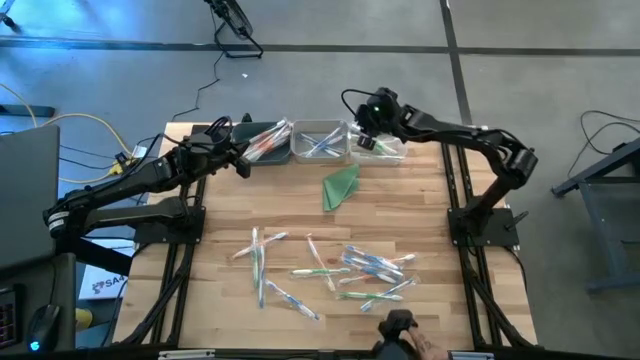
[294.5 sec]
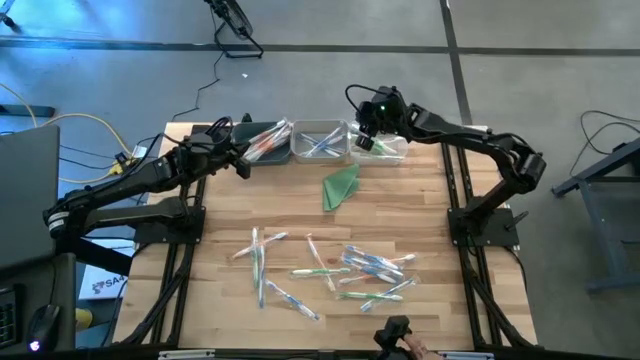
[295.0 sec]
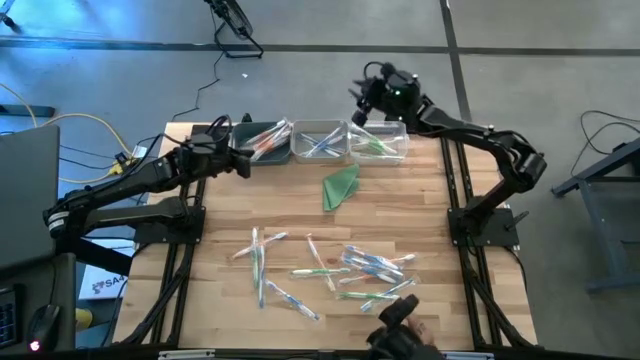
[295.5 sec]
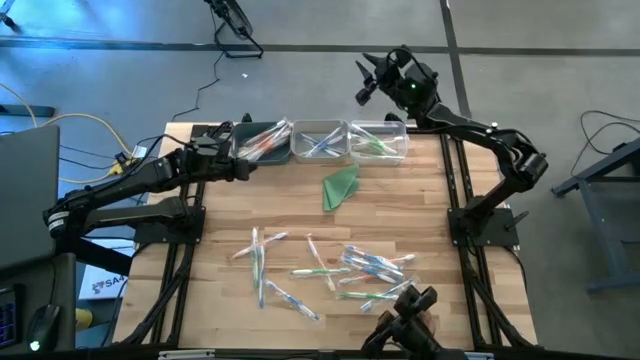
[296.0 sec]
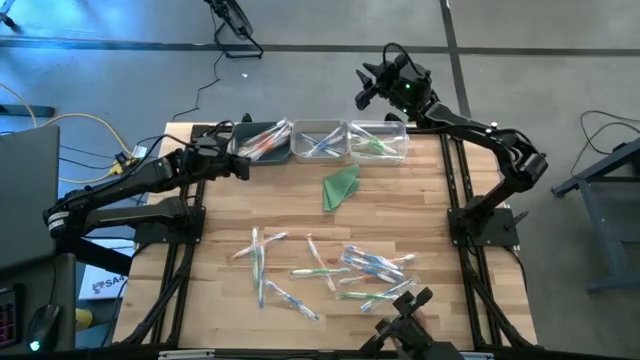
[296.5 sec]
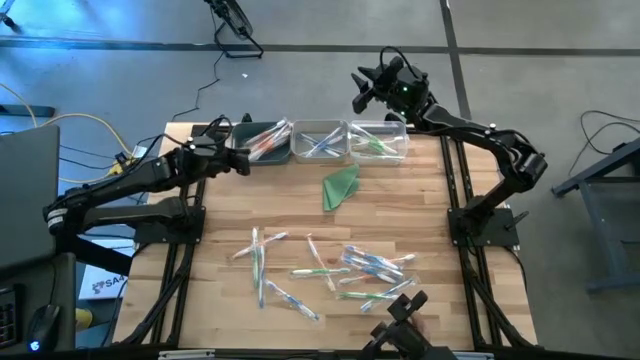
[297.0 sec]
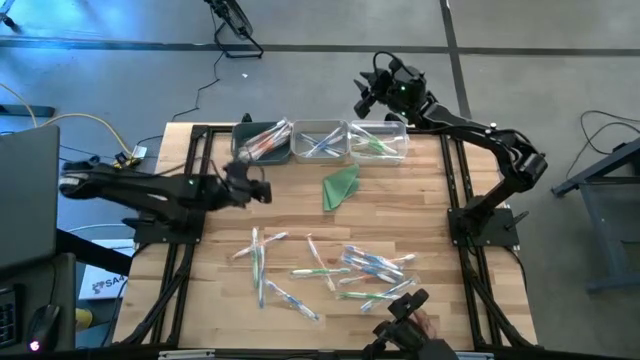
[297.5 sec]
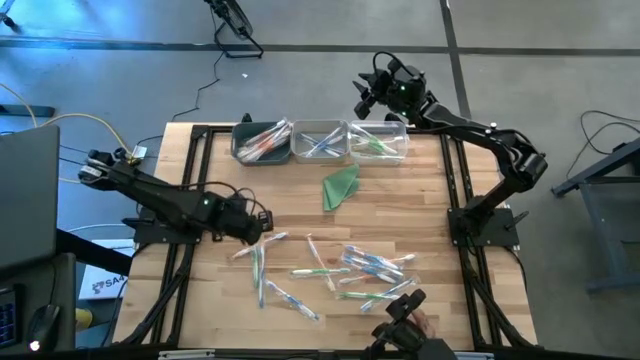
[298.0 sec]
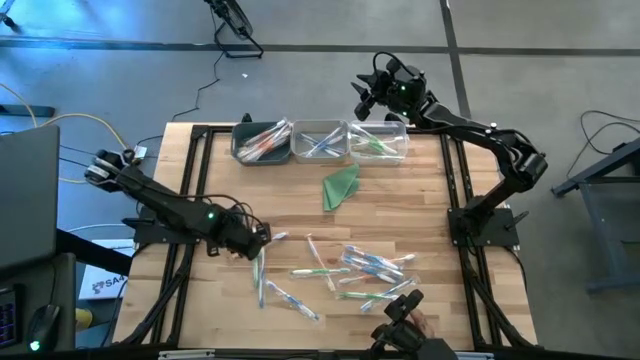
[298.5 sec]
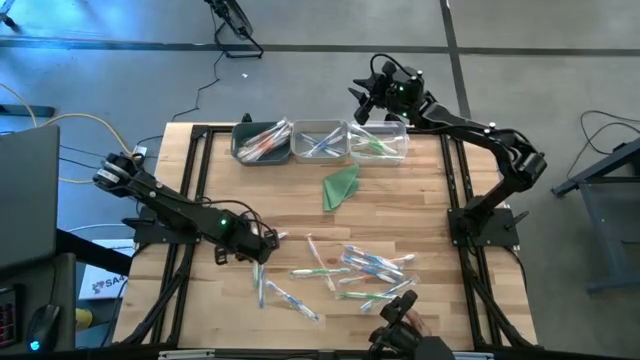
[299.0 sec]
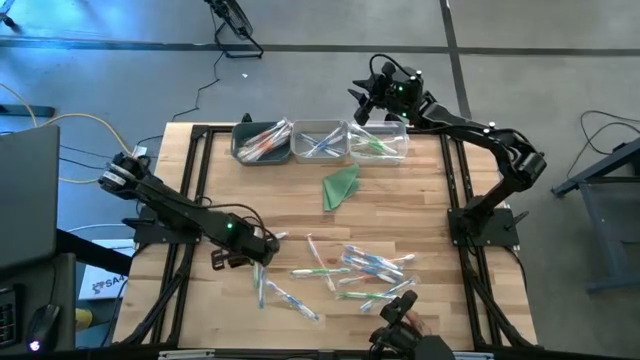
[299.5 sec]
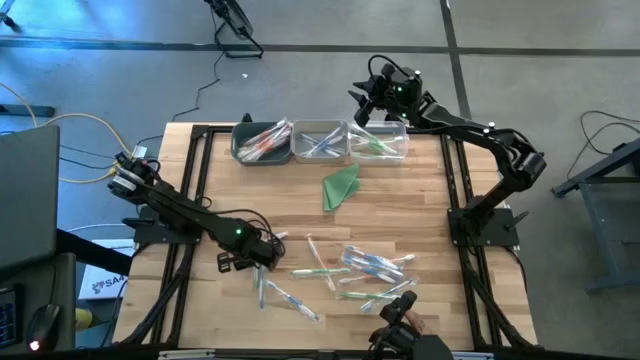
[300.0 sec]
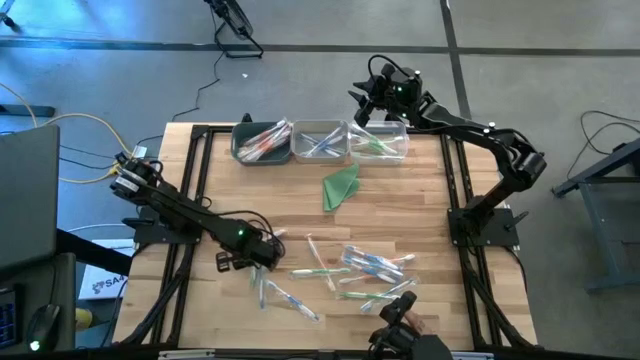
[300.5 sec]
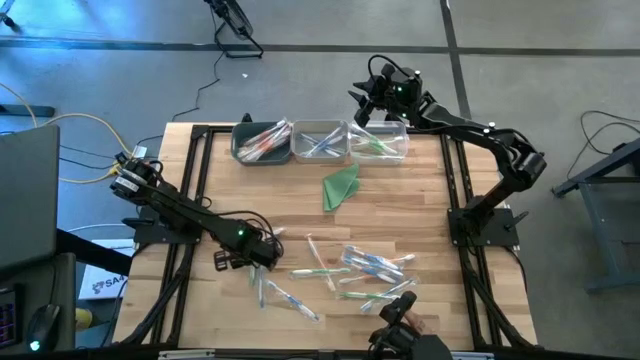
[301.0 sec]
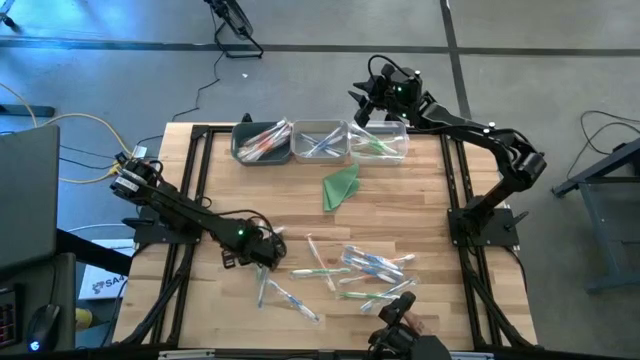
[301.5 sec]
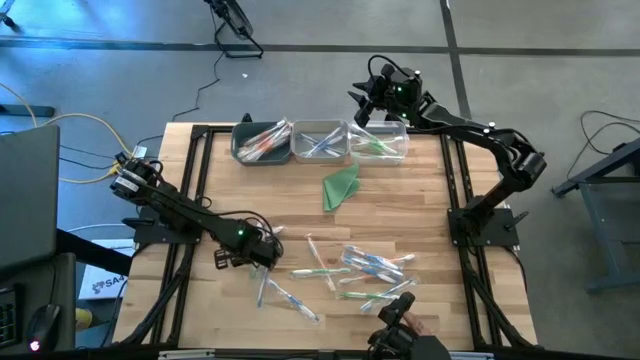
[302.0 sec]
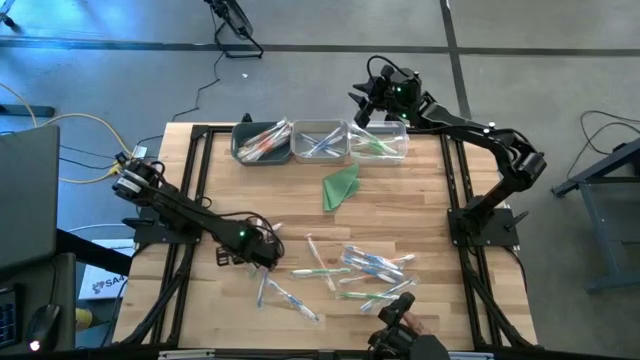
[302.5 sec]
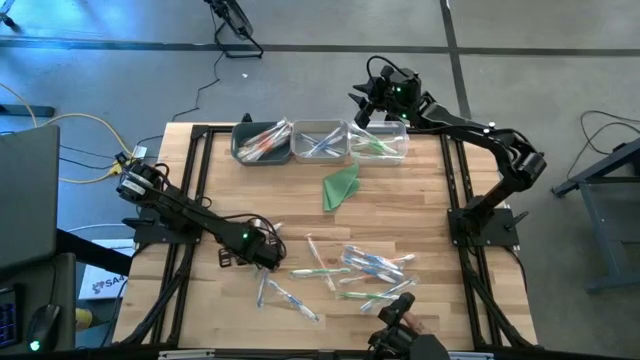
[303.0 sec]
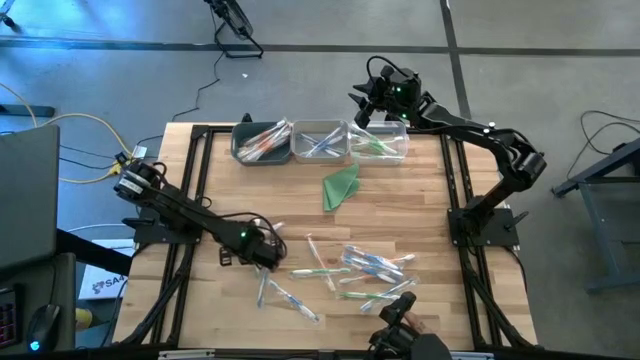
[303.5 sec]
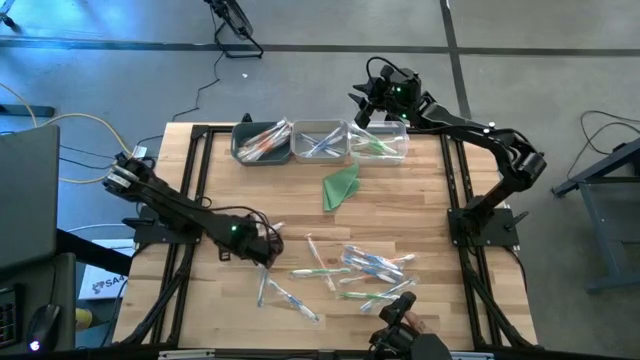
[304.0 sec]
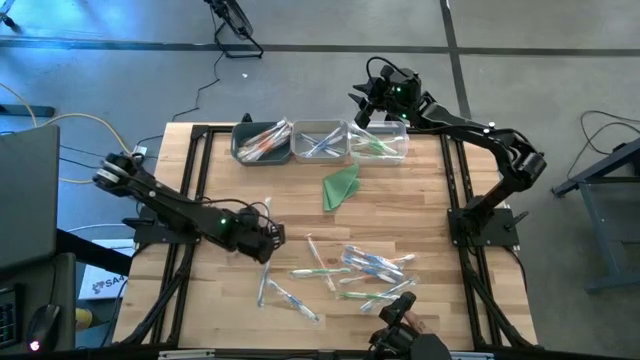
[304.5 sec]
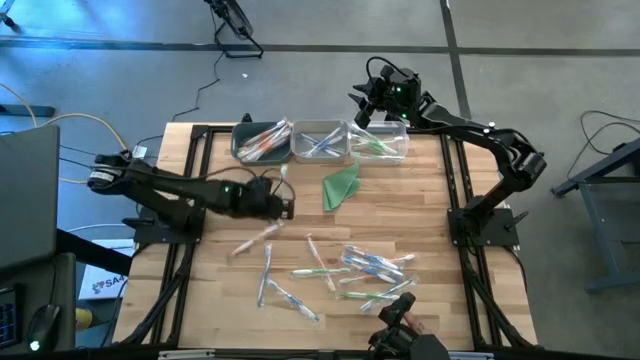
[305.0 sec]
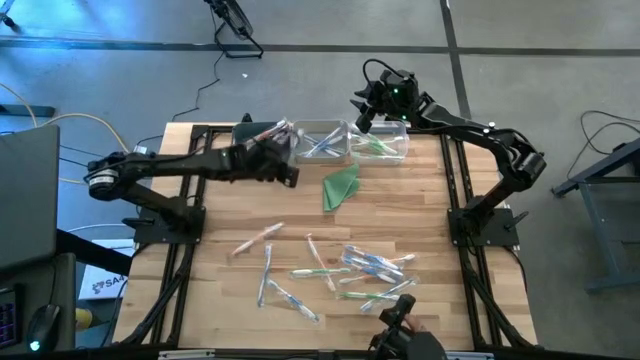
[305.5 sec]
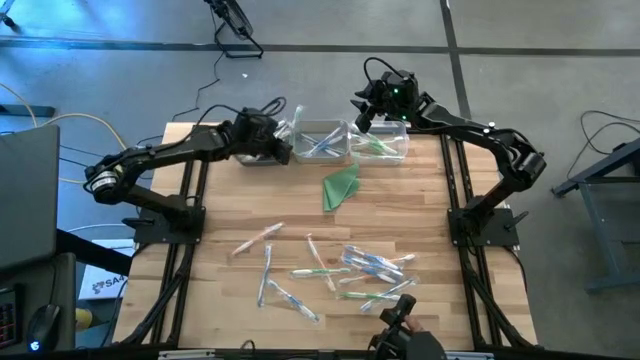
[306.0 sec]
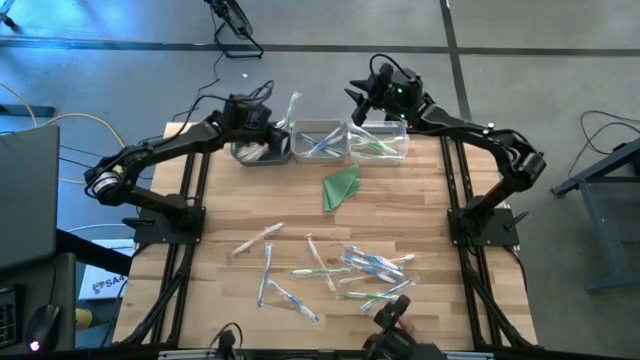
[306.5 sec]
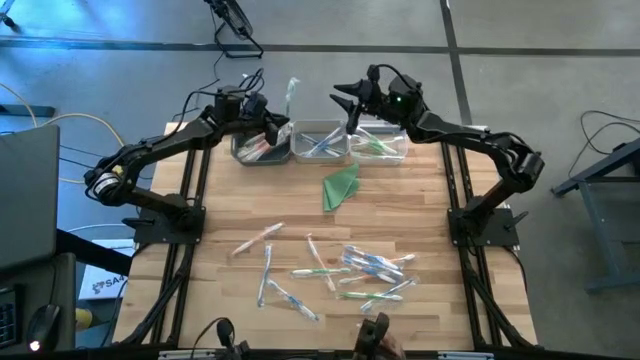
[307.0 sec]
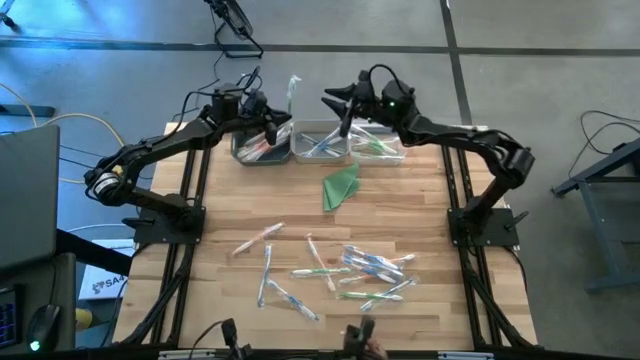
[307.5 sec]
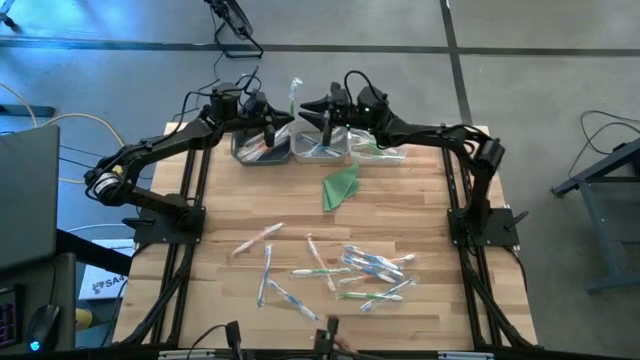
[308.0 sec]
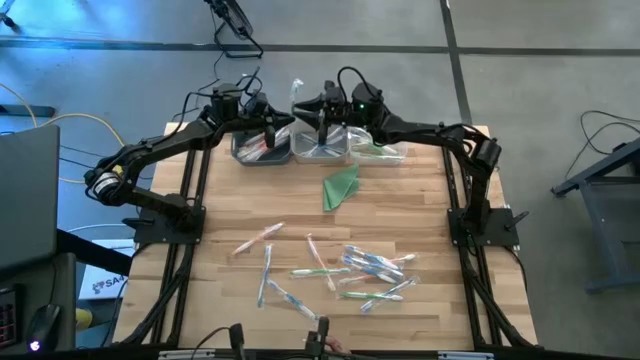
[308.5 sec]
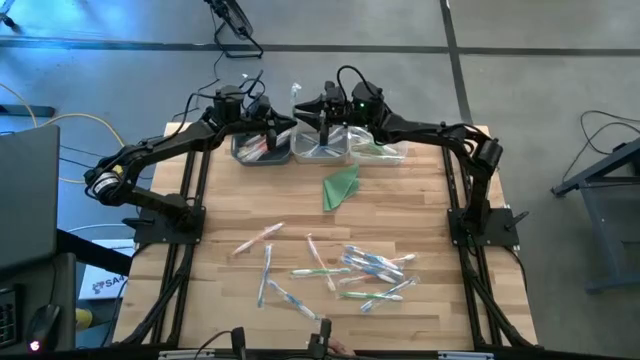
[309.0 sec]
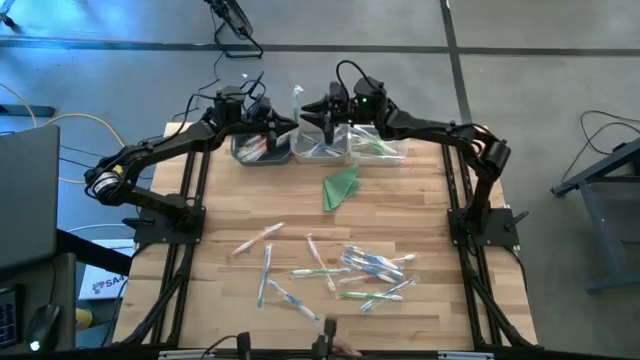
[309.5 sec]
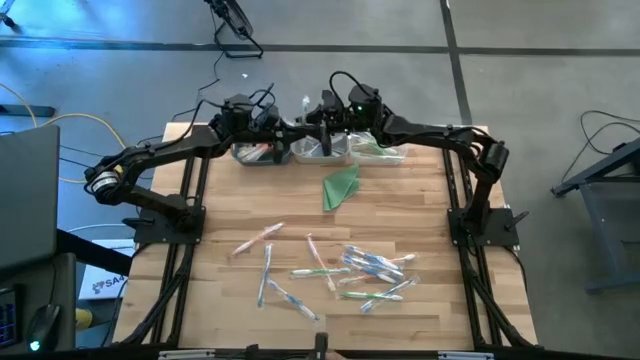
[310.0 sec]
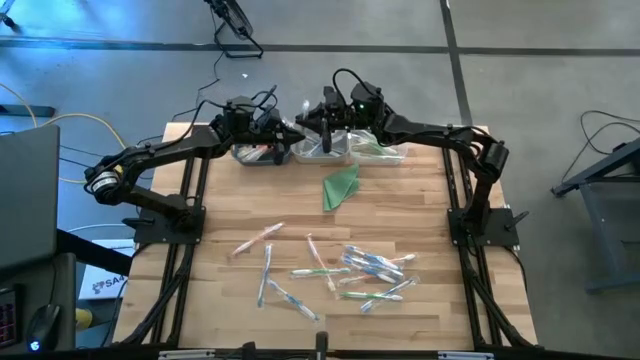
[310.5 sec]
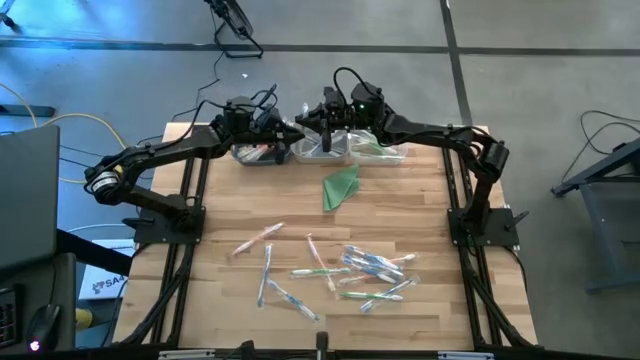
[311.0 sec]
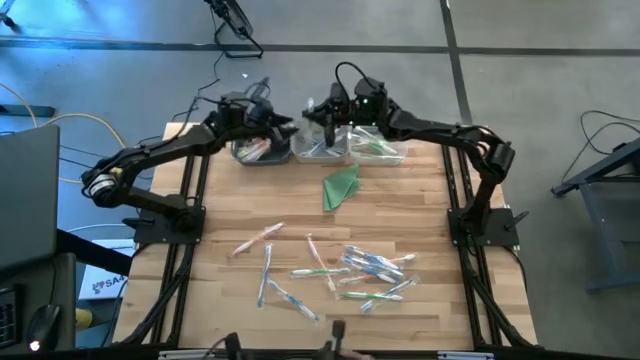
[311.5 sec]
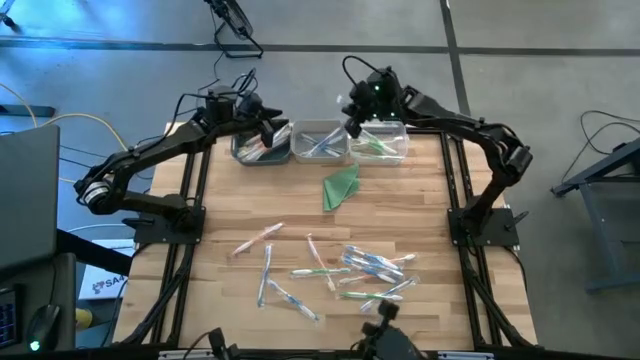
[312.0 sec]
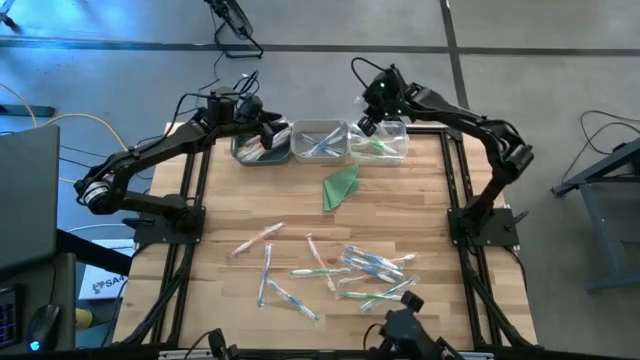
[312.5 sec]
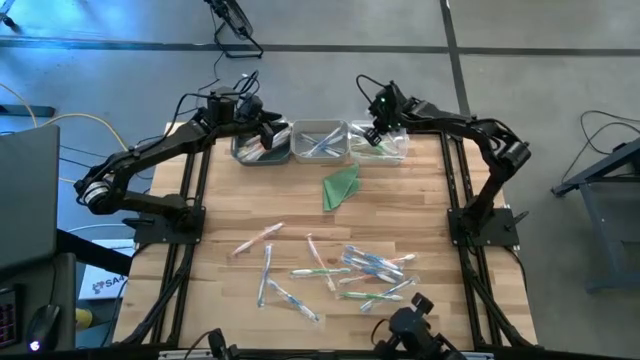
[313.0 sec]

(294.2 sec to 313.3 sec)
Task: Pick & Place Toothbrushes
Put the green toothbrush into the transparent bin

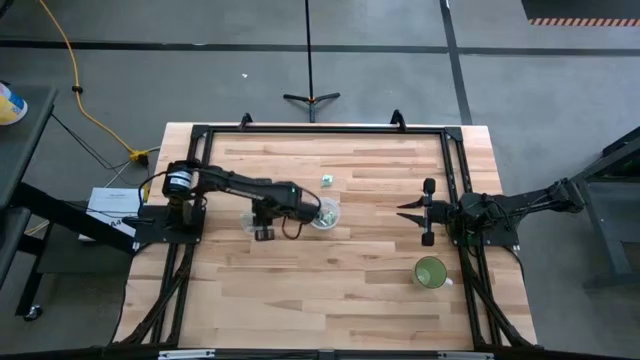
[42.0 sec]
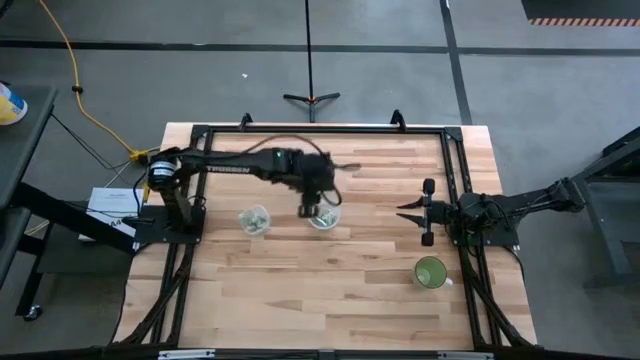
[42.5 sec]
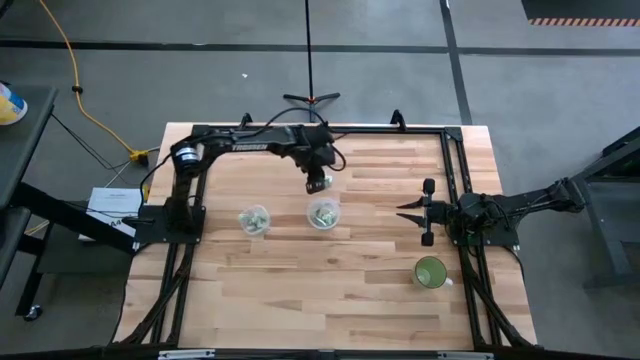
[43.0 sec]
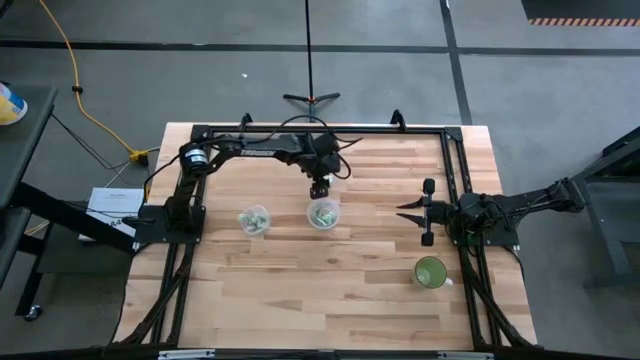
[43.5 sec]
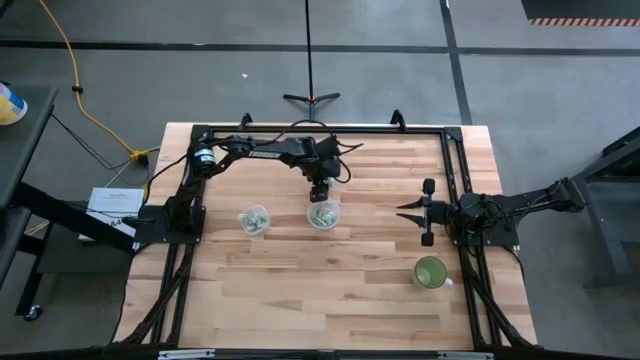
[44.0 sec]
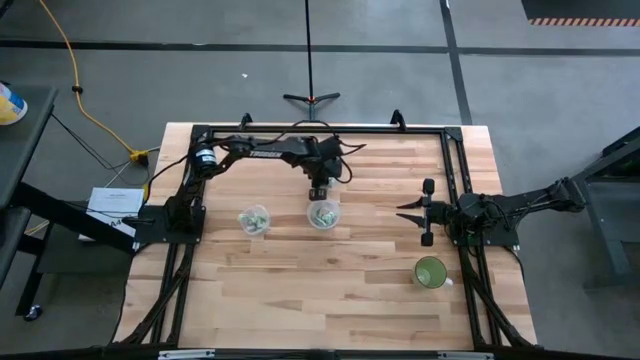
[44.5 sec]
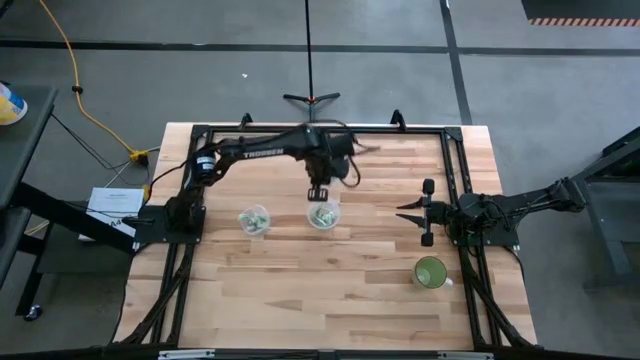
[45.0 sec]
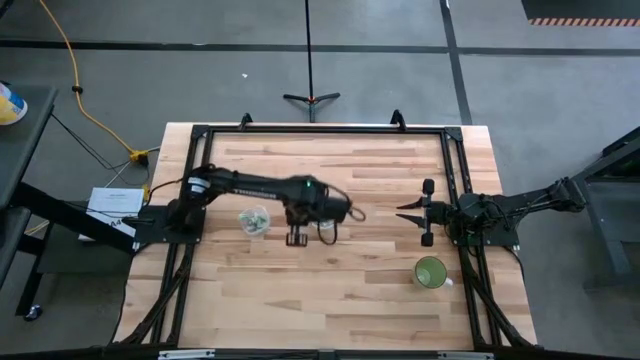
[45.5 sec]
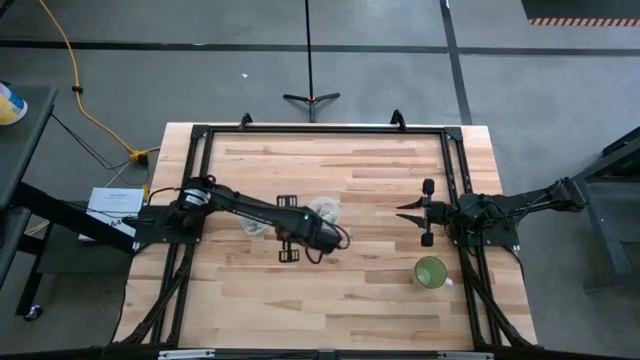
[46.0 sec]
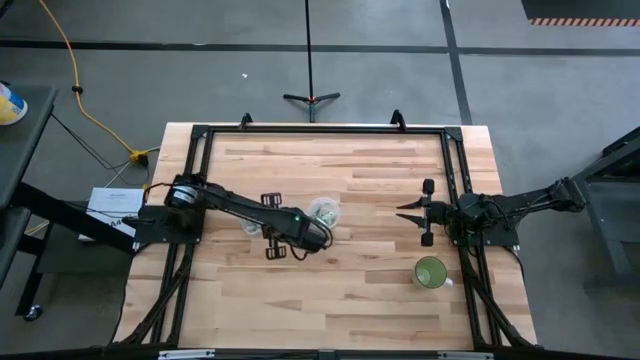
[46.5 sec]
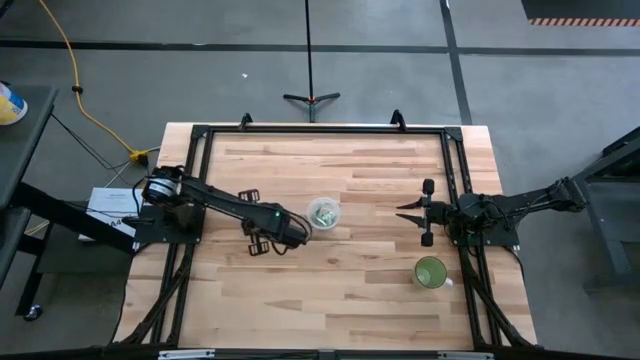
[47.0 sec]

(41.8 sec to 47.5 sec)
Task: Pick and place Stevia / Truvia into bins
Put the white stevia packet into the left transparent container
